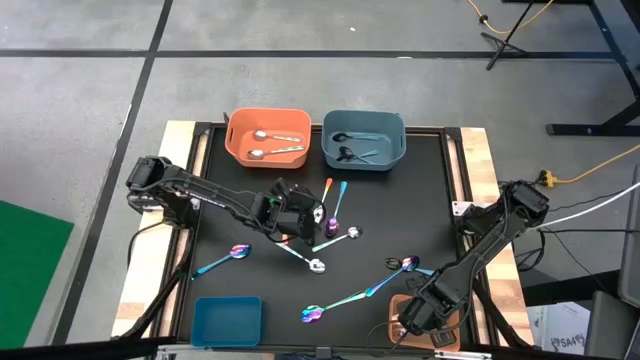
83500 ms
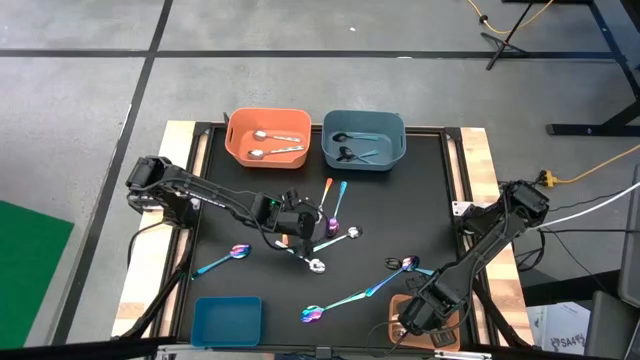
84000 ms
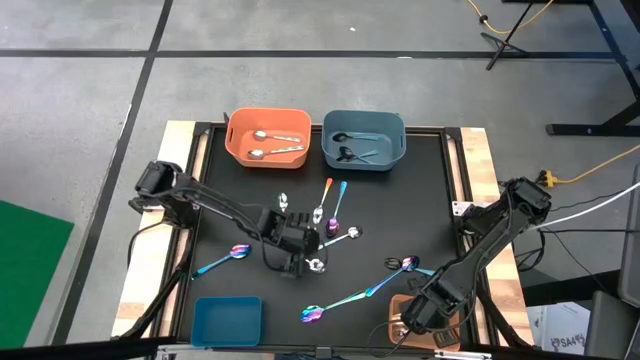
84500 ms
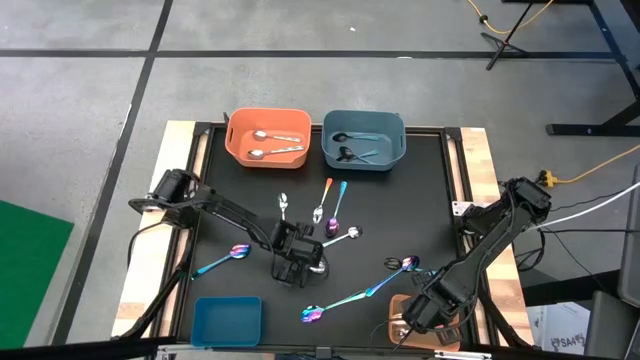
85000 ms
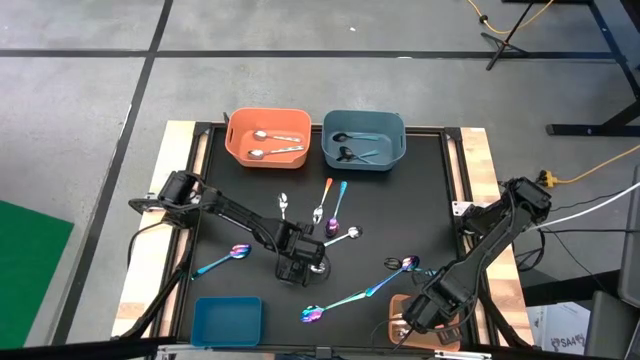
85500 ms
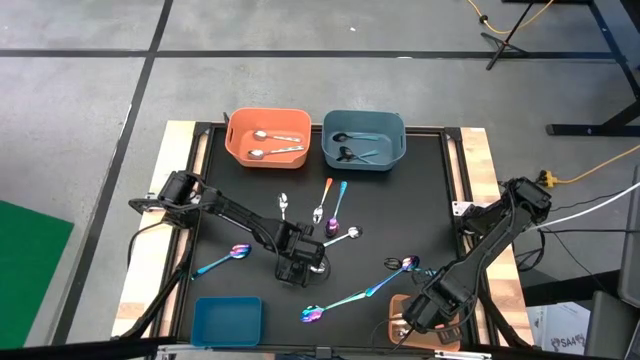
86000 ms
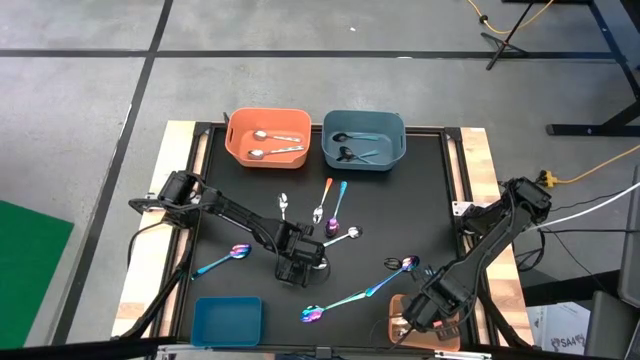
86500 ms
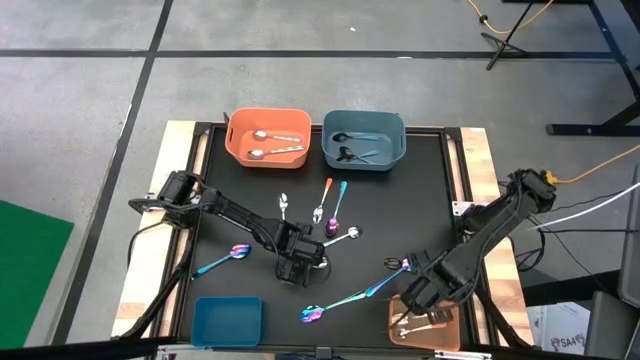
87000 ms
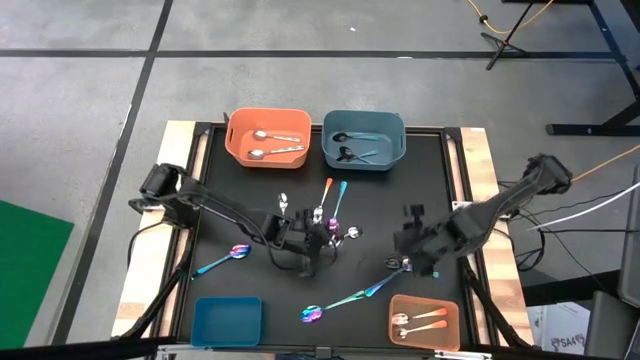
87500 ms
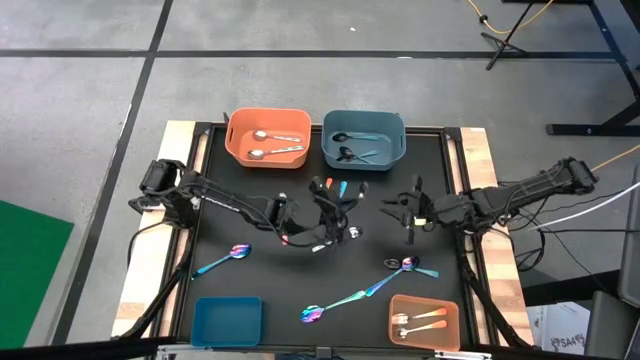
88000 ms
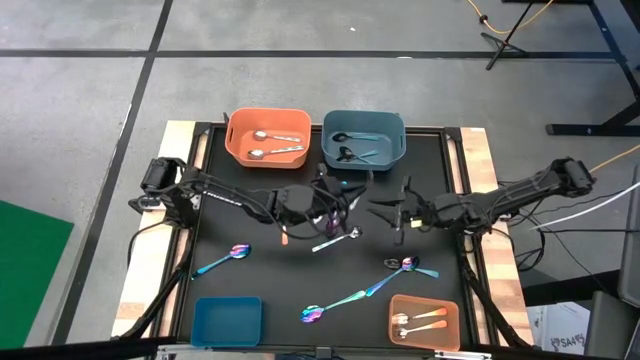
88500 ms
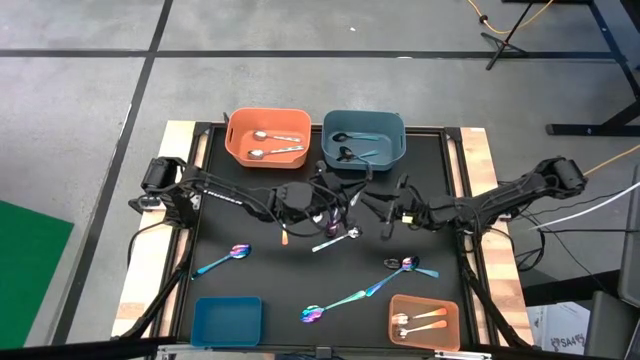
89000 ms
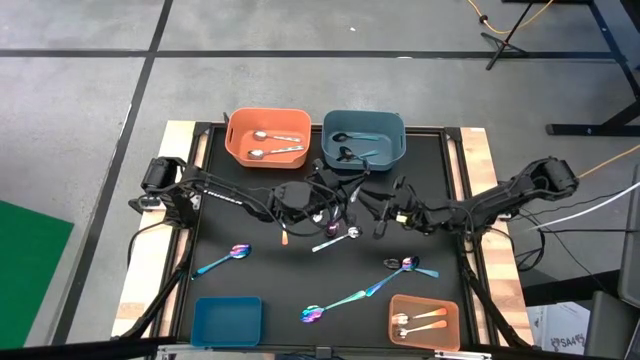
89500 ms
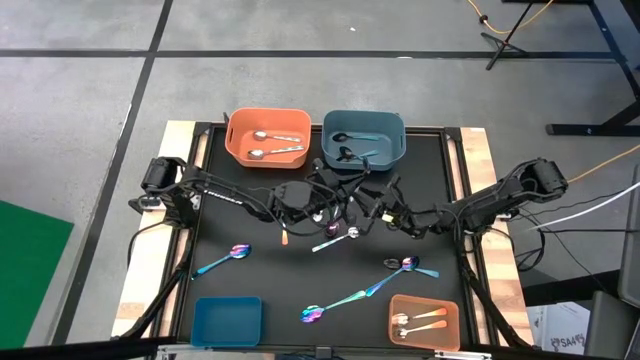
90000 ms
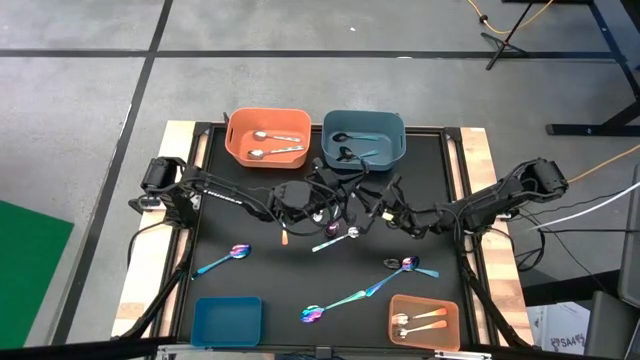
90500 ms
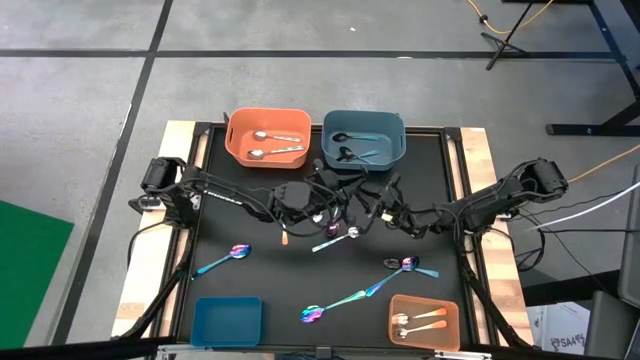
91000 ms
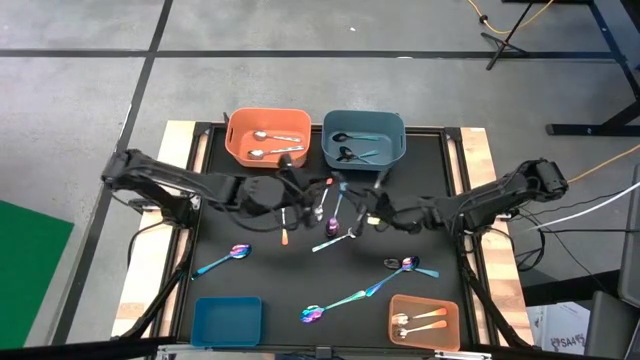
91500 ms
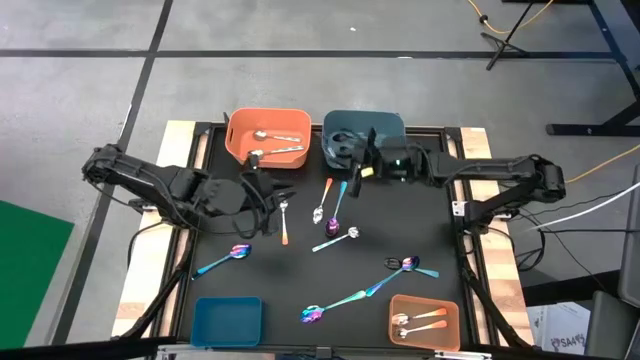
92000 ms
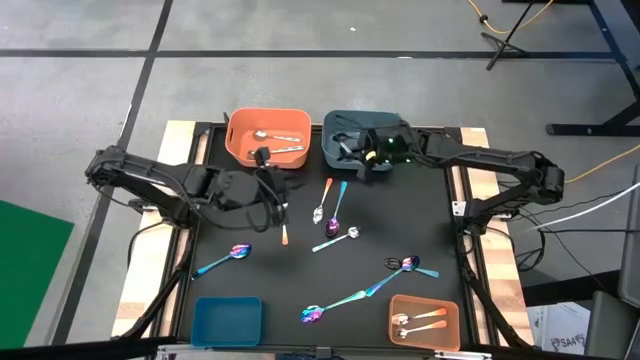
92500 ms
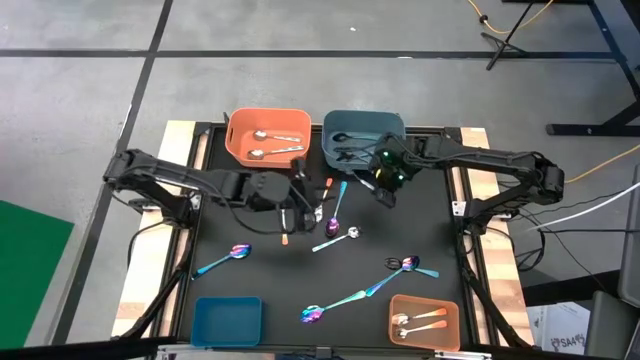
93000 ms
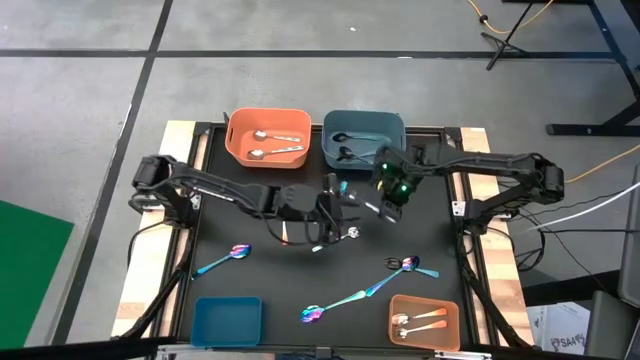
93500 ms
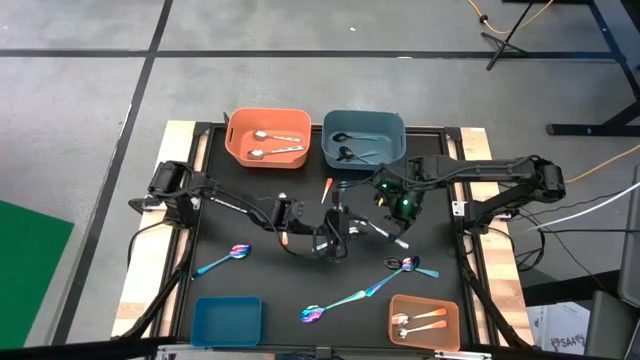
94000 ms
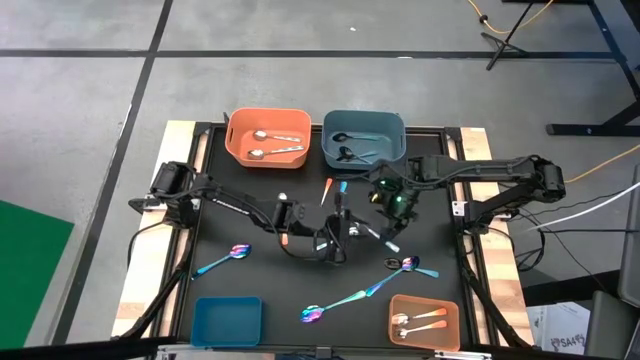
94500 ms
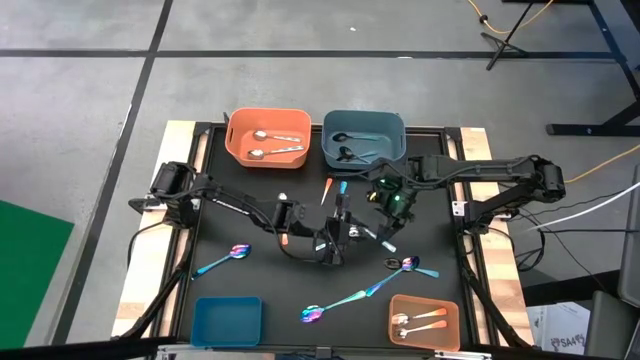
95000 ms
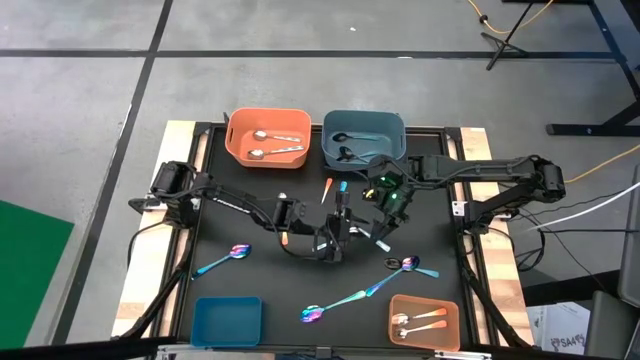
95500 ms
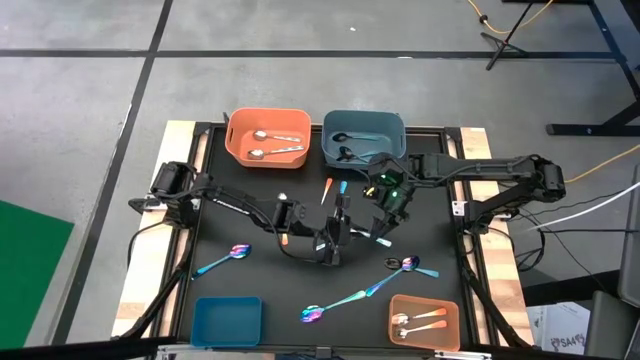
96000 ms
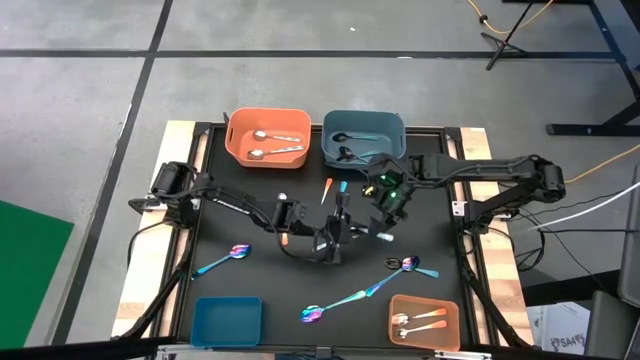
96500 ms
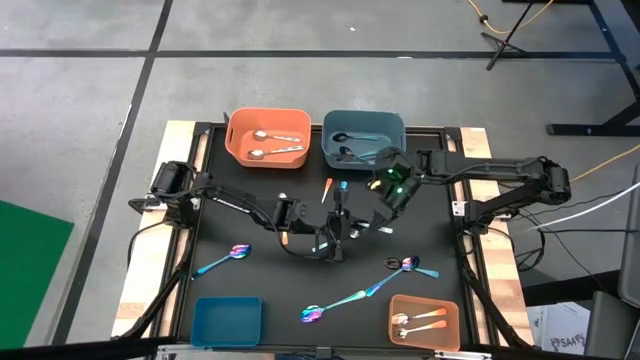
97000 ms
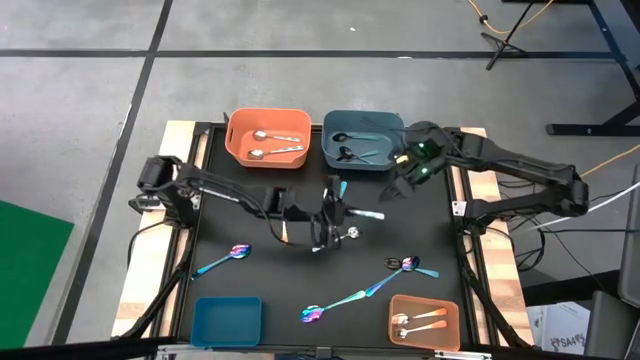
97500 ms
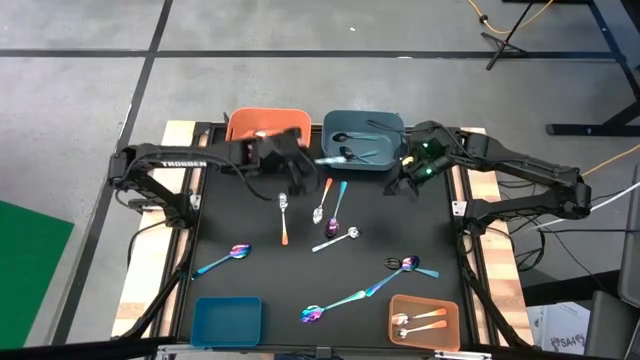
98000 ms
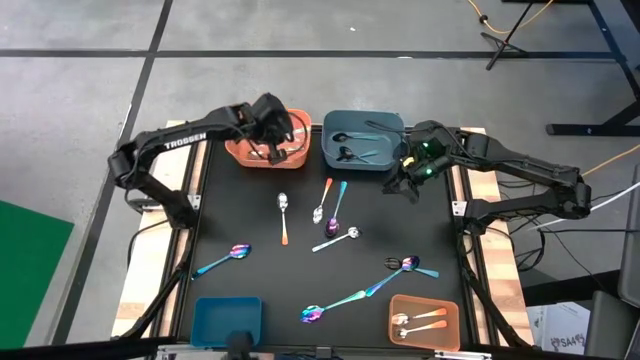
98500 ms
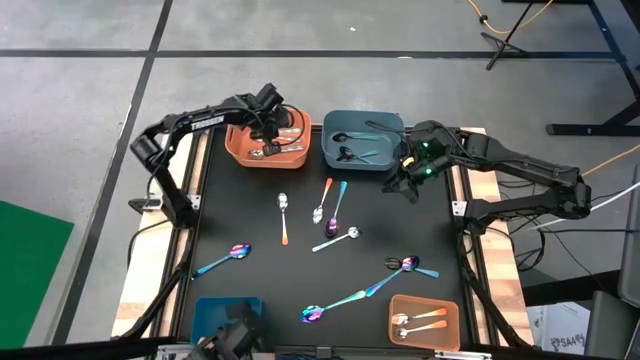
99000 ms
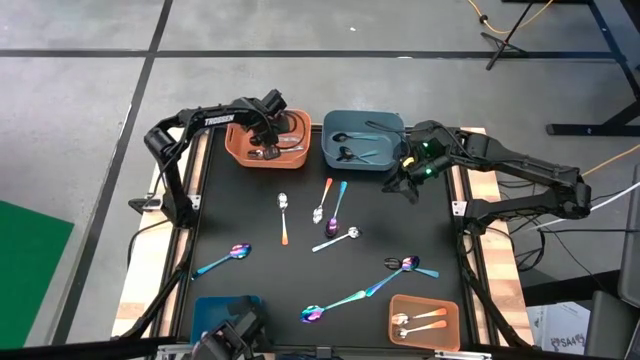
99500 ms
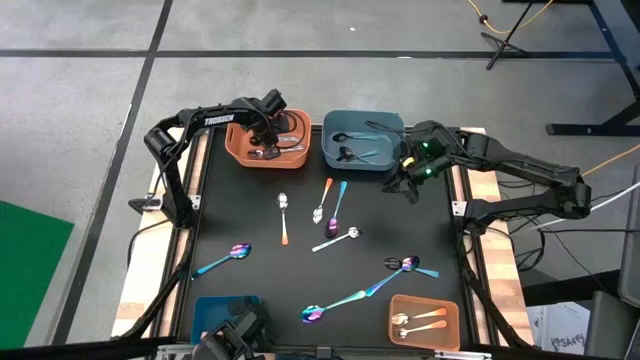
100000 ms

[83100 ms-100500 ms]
Task: Sort silverware by color (type)
Put the white patterned spoon into the top orange bin

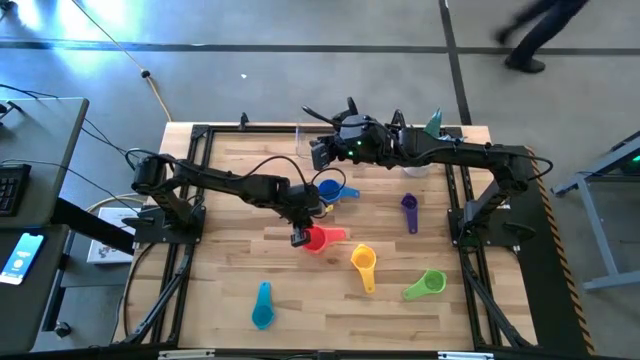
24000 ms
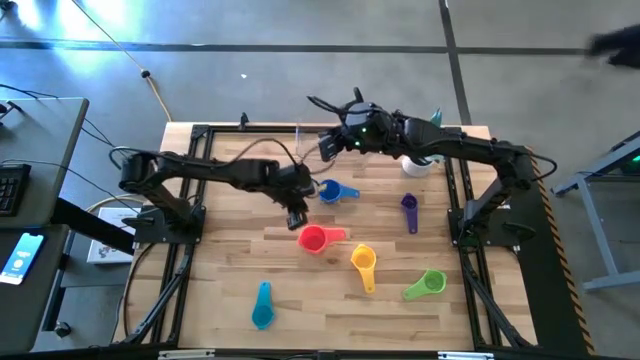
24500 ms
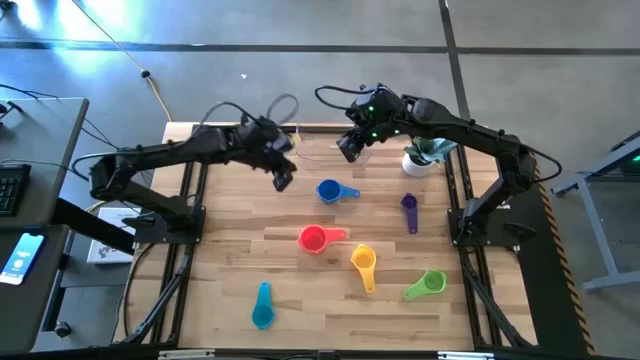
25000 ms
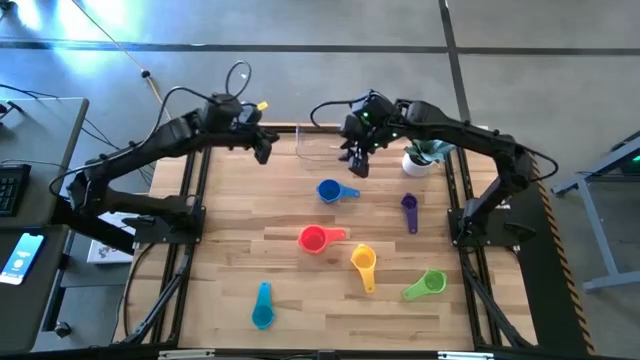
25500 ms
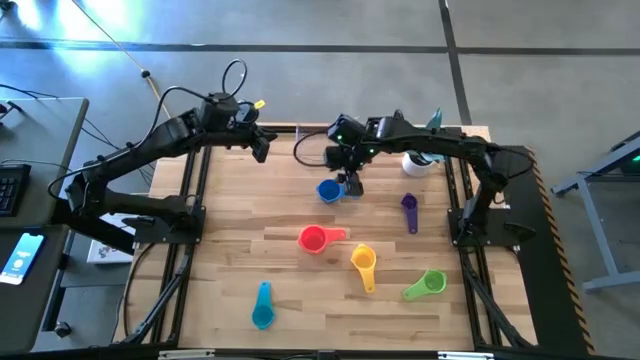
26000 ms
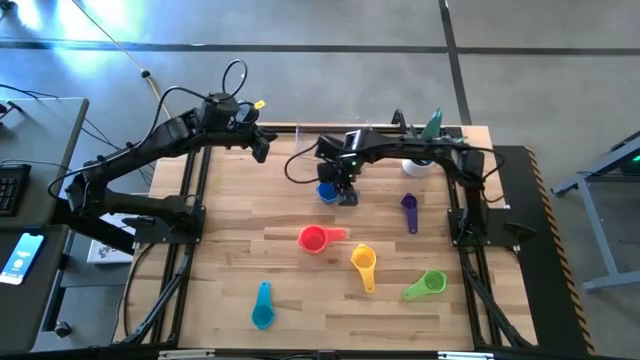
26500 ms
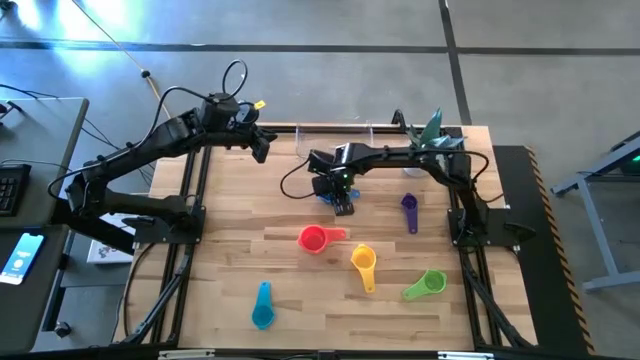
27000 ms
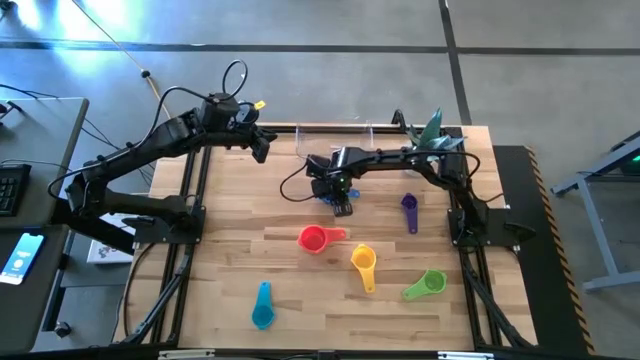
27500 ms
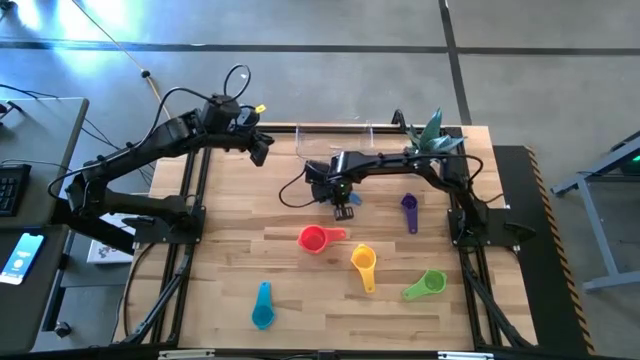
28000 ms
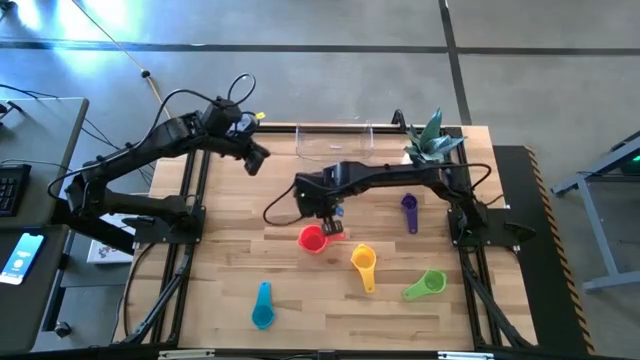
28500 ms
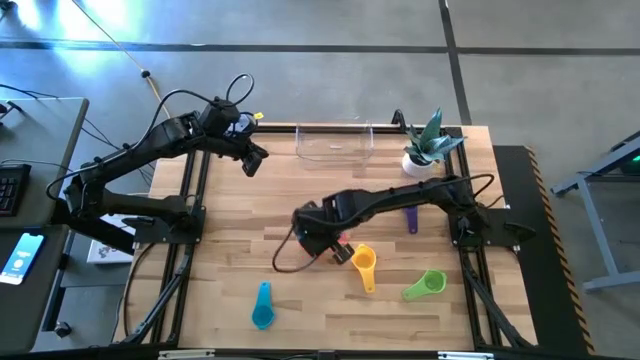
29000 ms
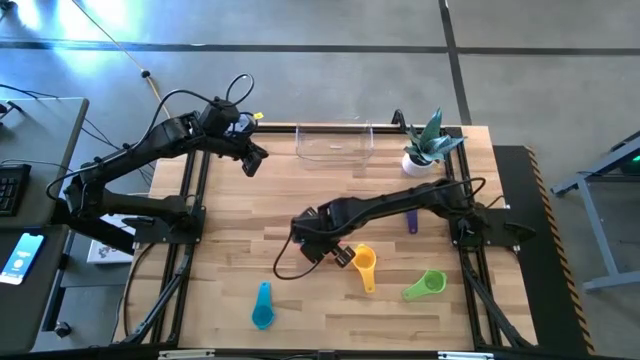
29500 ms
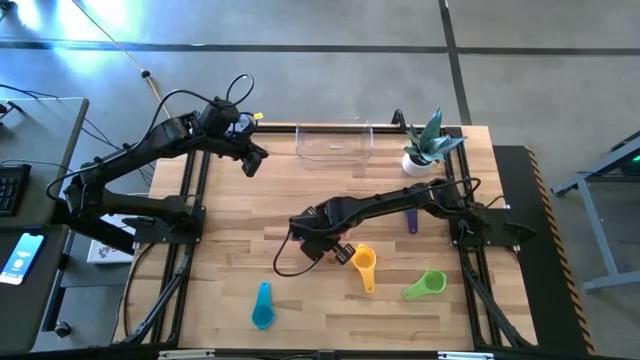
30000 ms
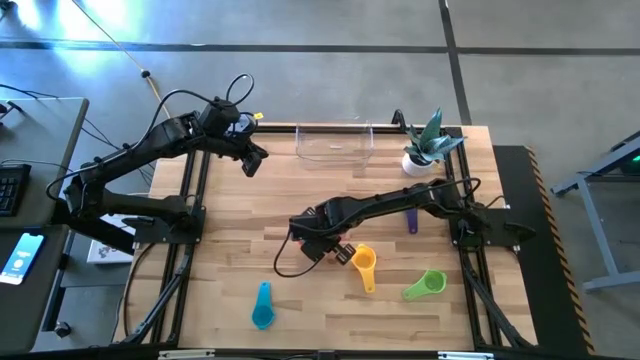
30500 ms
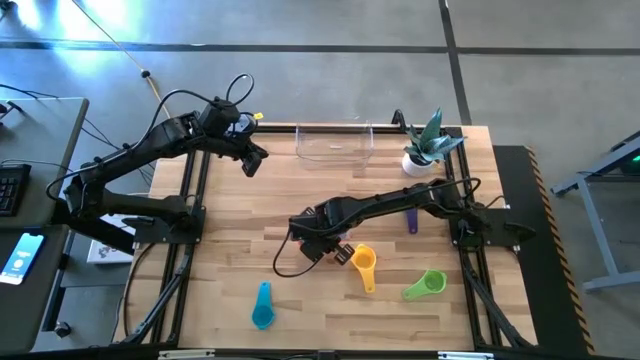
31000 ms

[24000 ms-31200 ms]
Task: Nest measuring cups in basket
Stack the top left blue measuring cup on top of the red measuring cup
